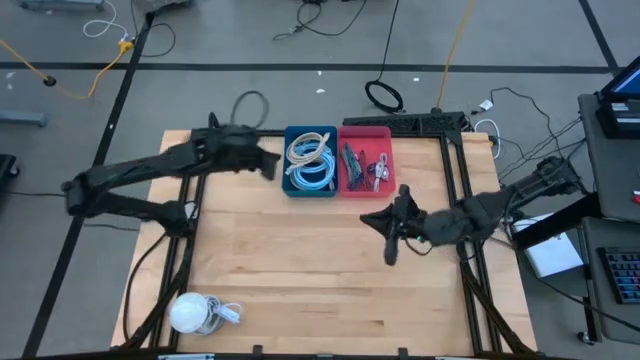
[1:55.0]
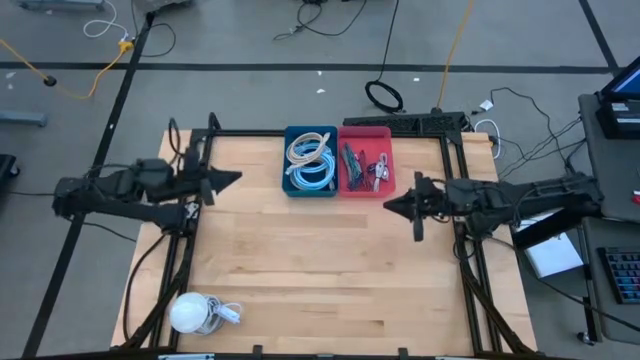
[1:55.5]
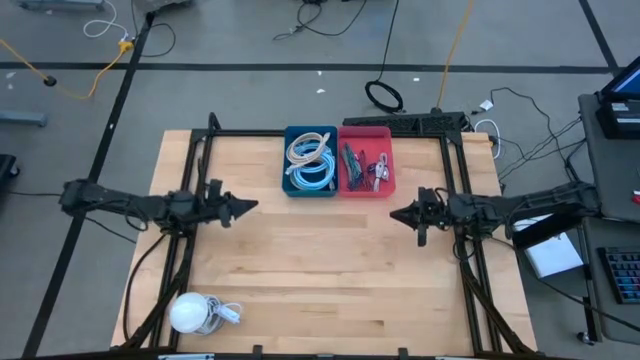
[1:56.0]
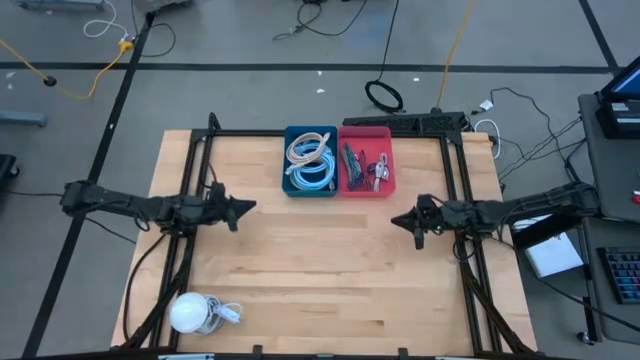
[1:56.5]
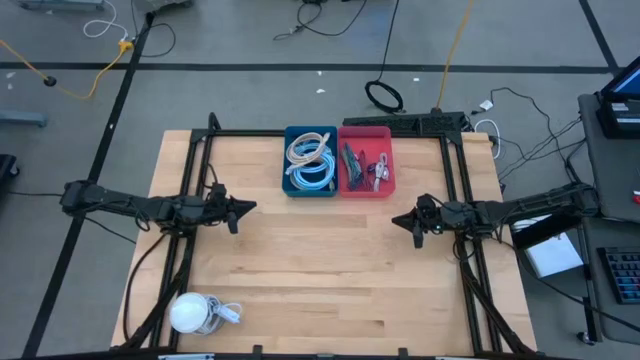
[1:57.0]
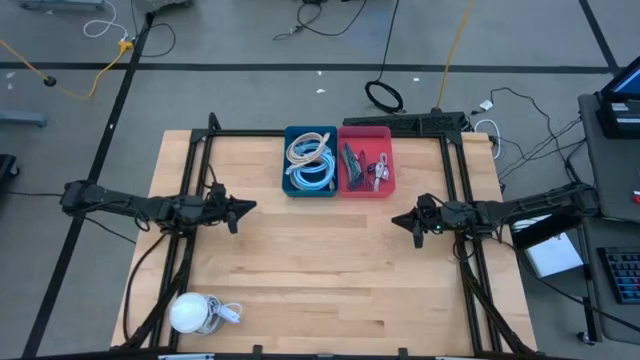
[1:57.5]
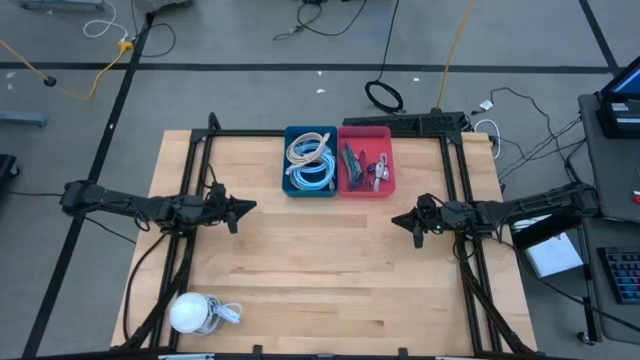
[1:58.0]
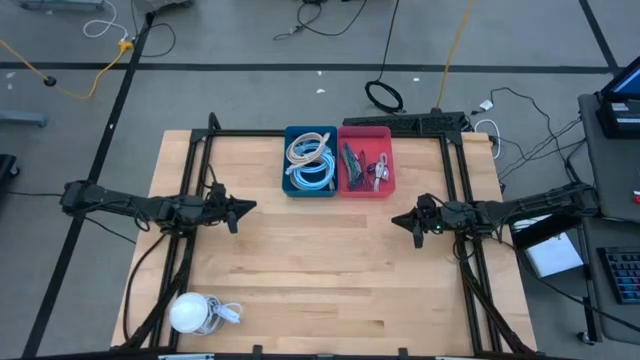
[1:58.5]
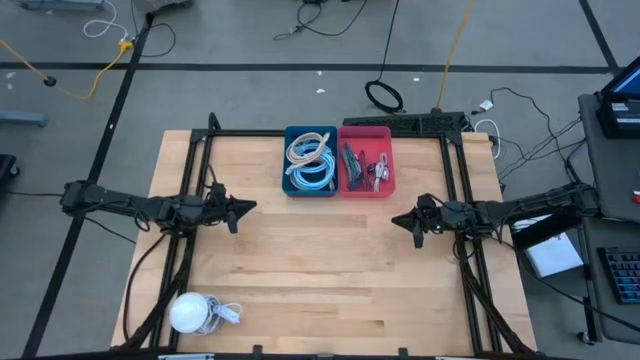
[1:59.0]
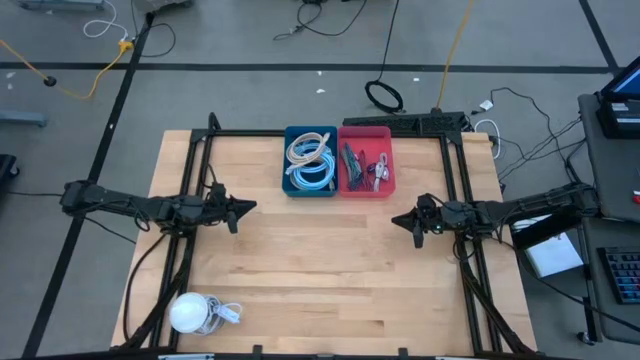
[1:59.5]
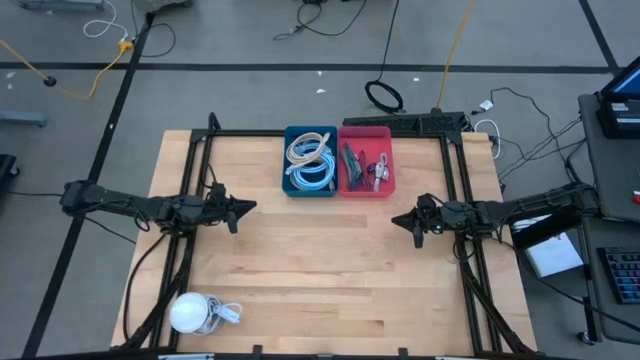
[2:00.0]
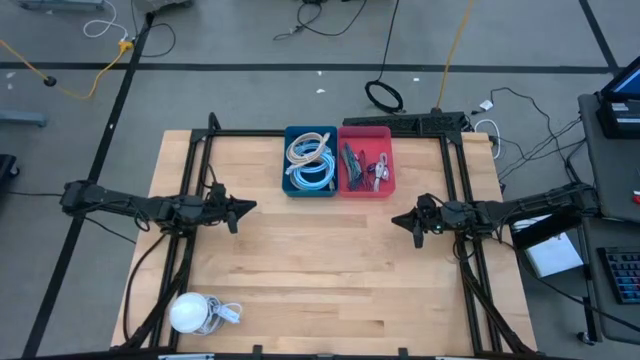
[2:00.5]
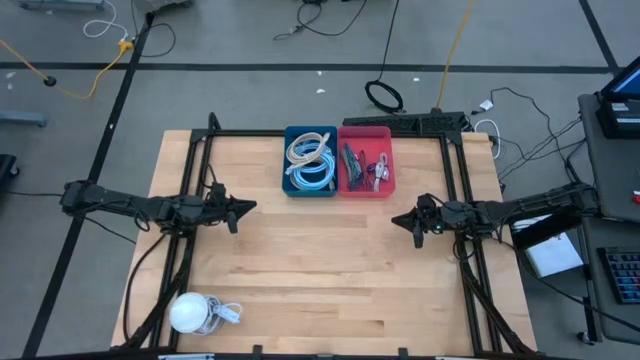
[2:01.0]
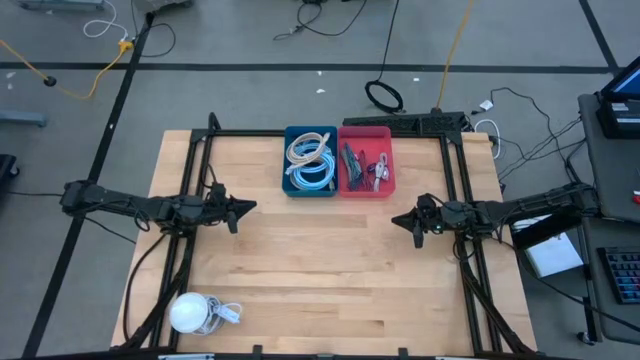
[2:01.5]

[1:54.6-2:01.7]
Task: Pick & Place USB Port
Return to Home Position

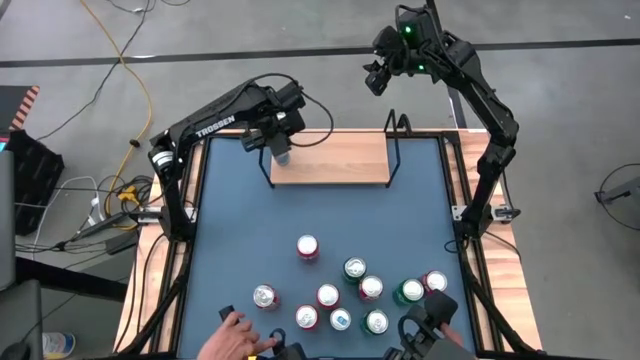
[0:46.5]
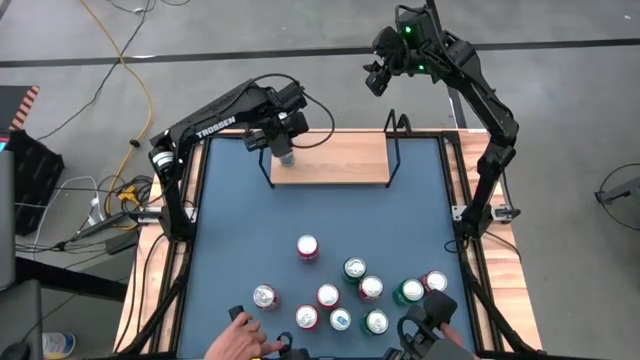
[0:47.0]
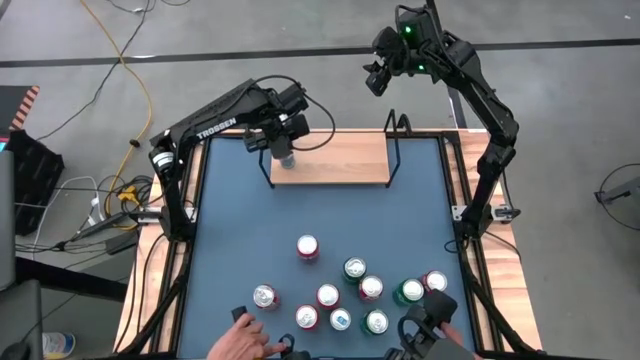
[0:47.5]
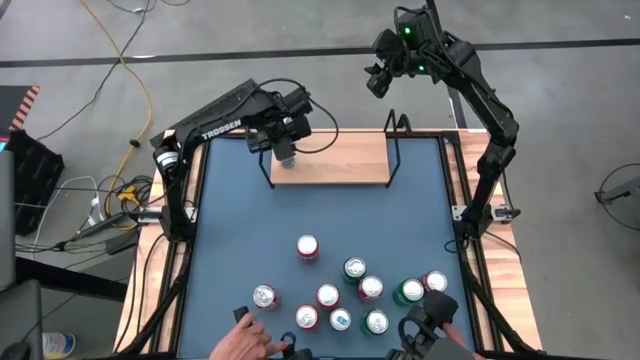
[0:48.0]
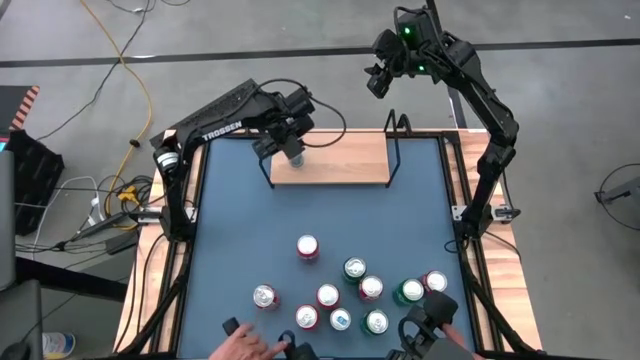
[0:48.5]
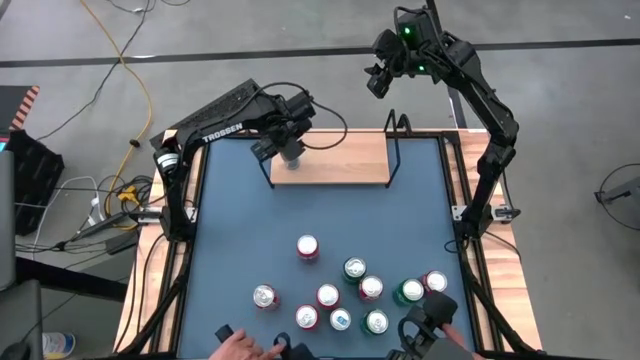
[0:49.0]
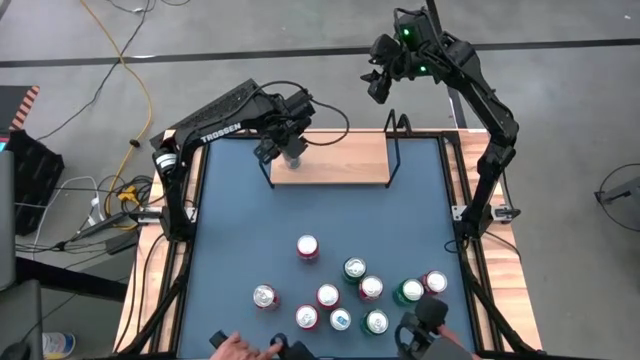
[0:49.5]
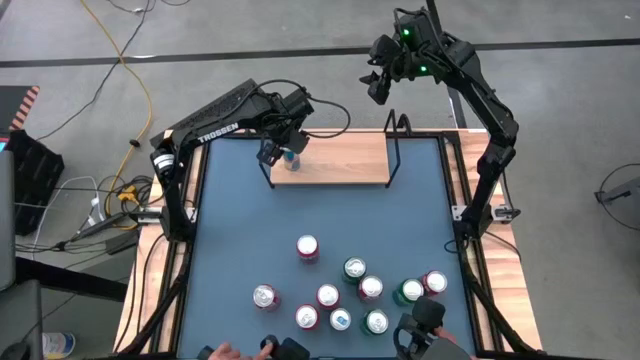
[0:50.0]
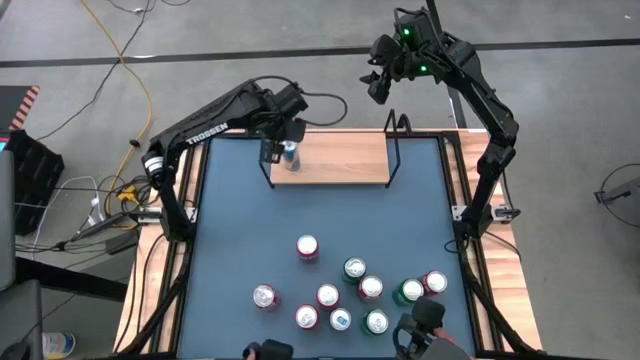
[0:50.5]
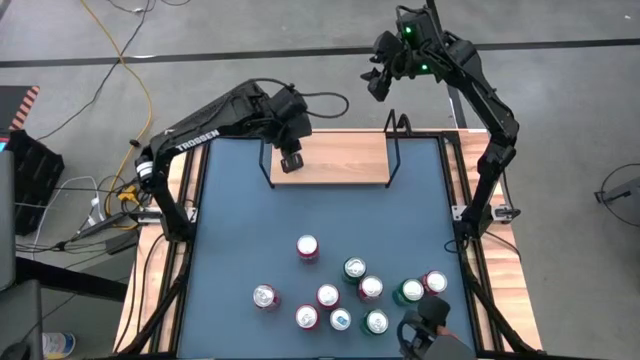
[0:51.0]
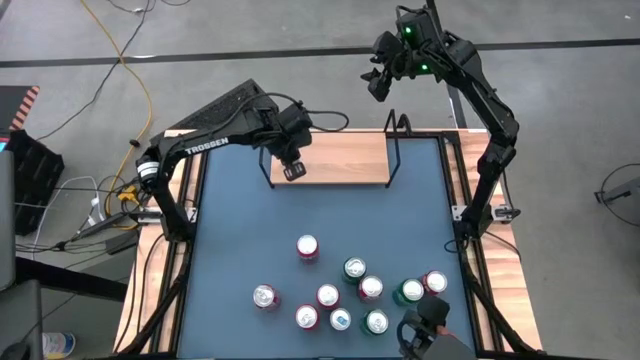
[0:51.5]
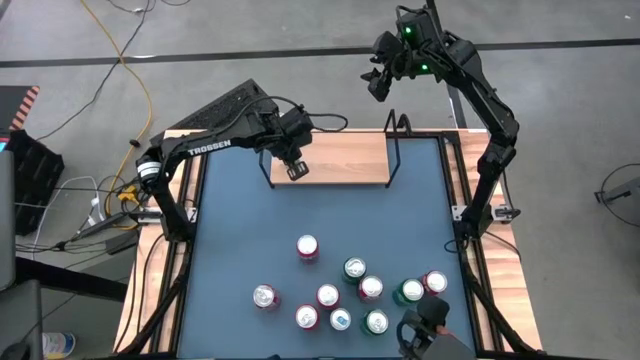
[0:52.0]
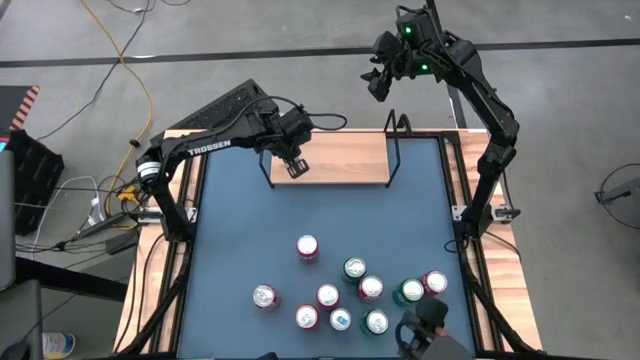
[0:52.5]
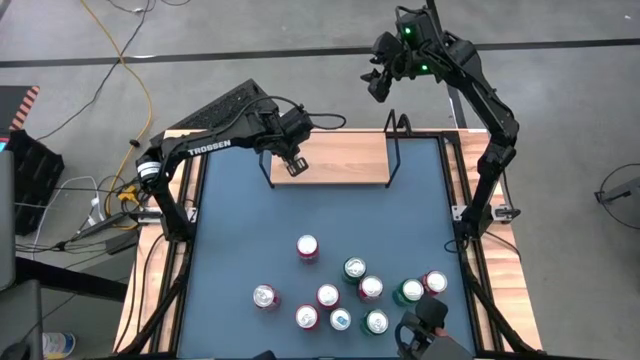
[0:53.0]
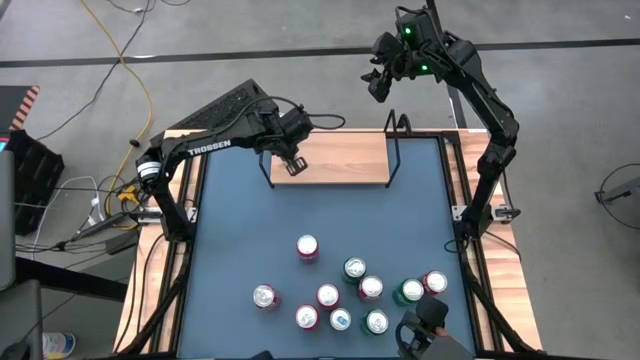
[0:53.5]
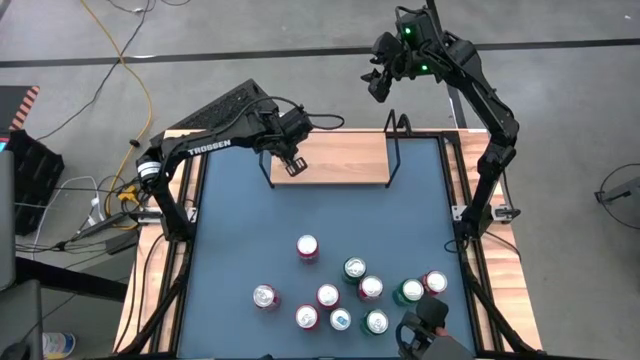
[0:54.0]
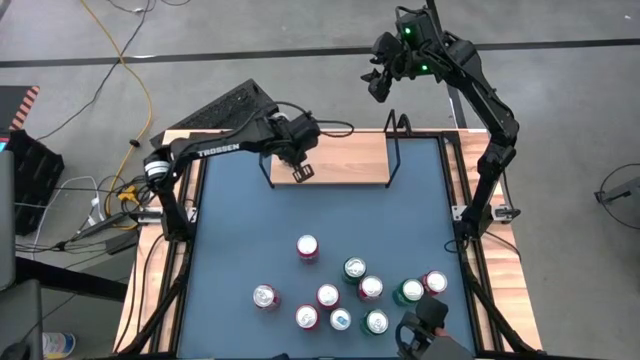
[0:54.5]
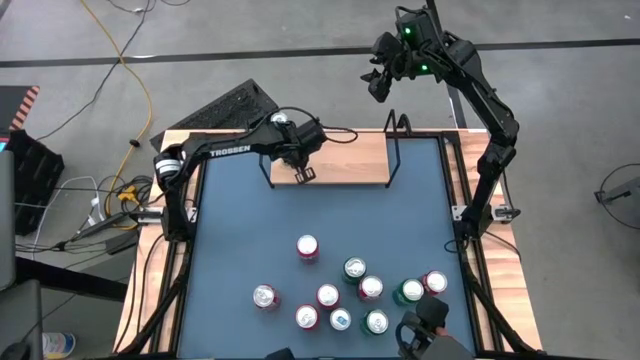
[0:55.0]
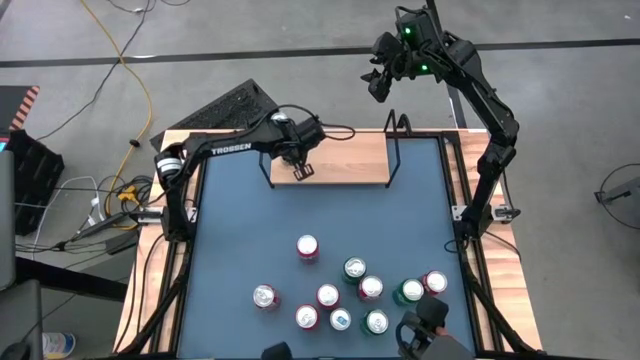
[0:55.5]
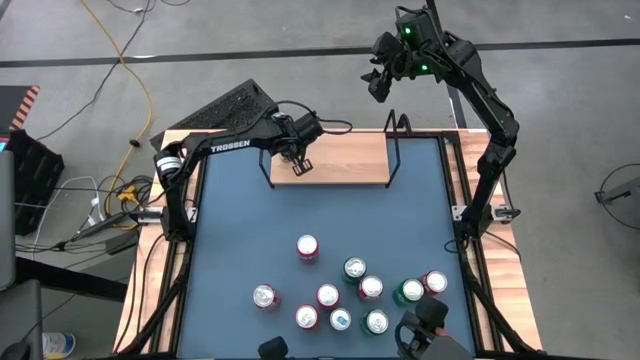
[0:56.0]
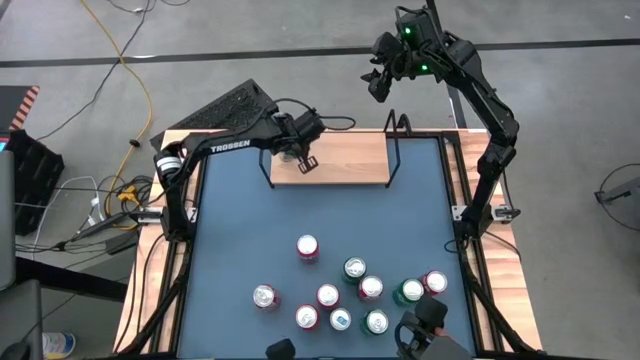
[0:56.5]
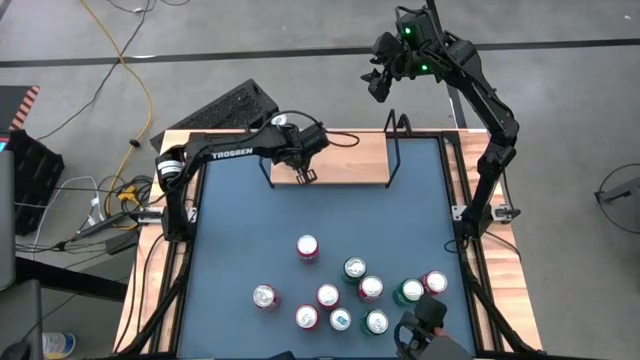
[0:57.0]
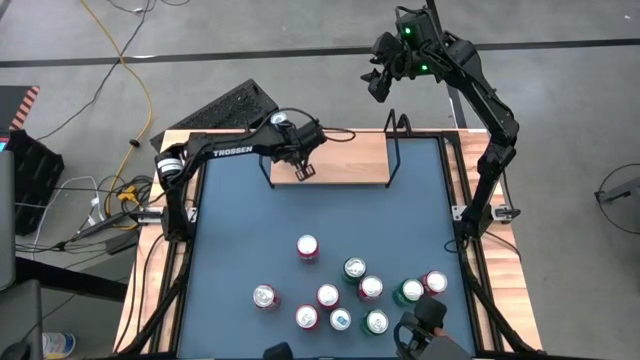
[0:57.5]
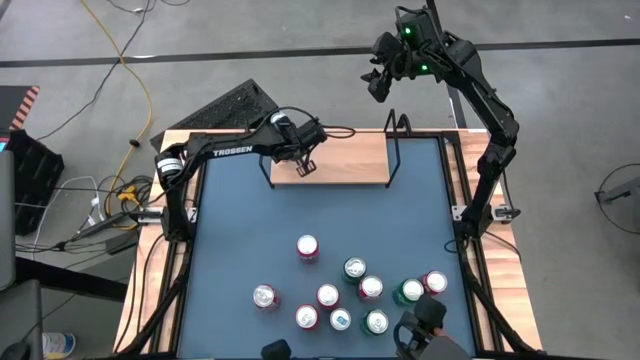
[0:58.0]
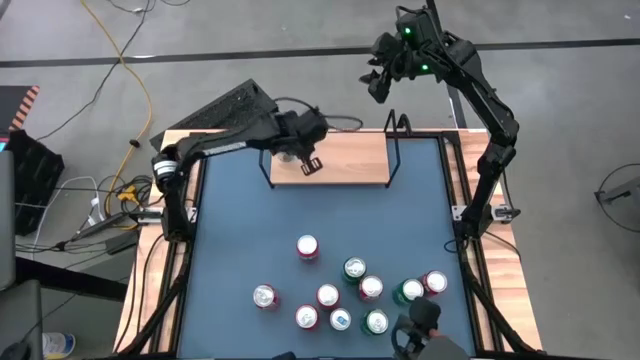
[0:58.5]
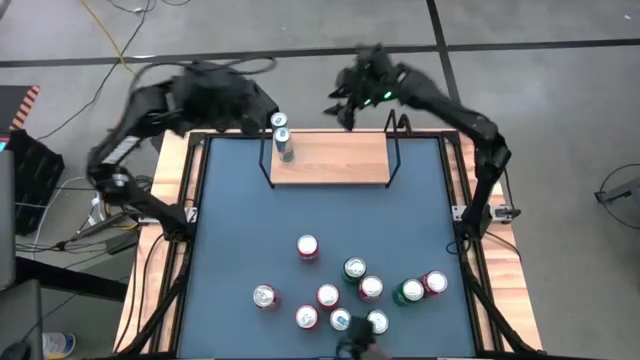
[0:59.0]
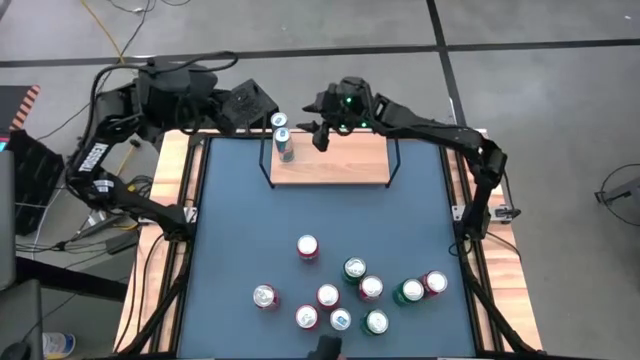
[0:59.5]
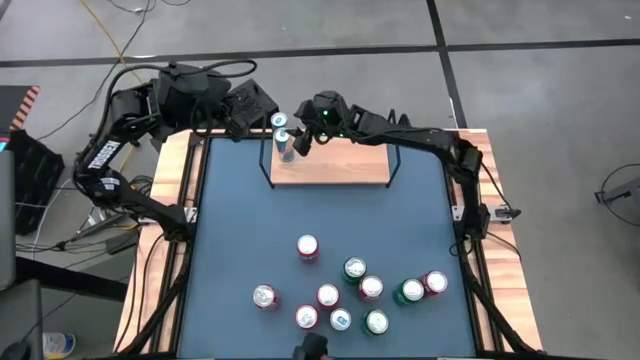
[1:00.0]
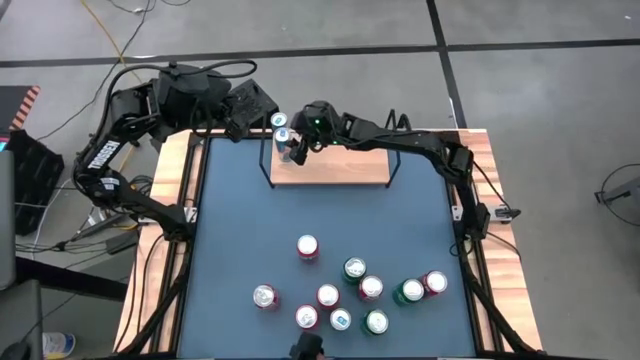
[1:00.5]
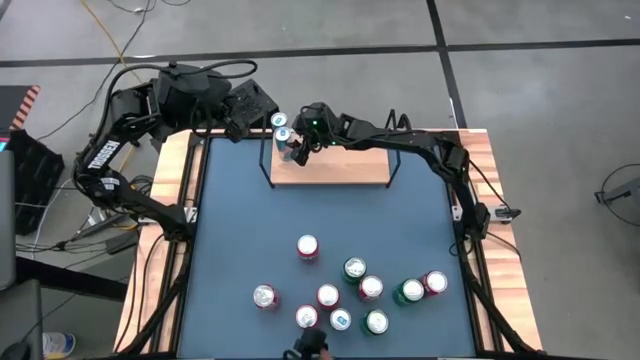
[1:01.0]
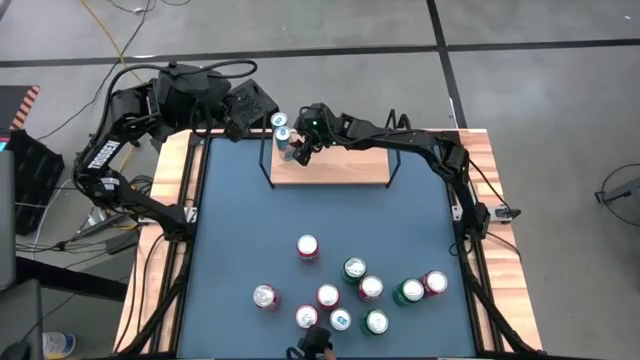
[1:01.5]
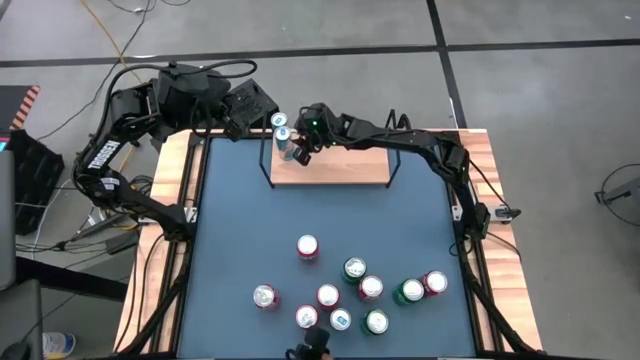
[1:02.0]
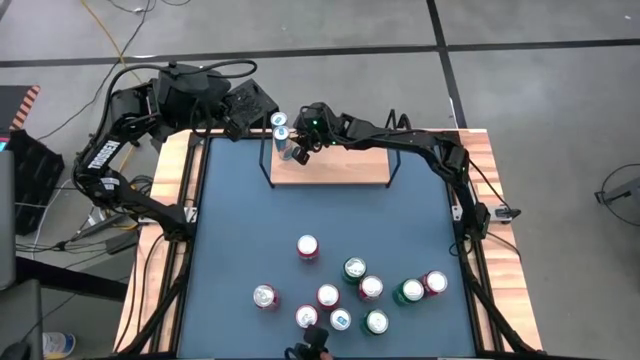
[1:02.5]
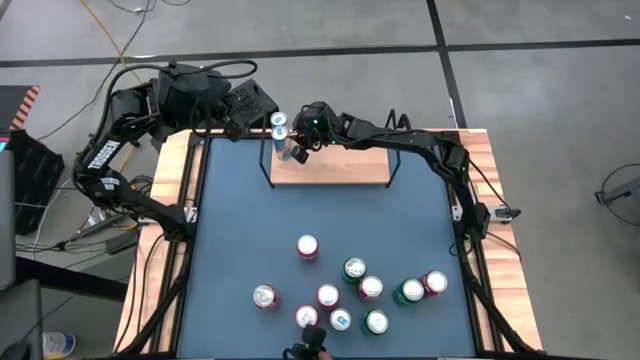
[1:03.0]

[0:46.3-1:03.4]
Task: Place canned beverage on shelf
Put the left blue soda can on the shelf aligned with the other blue soda can
